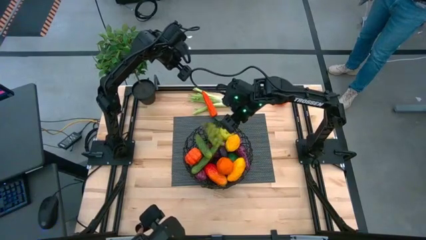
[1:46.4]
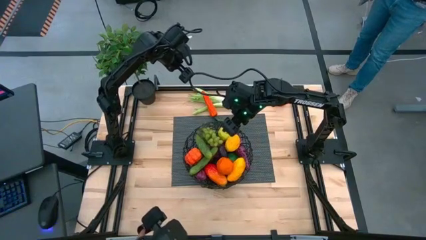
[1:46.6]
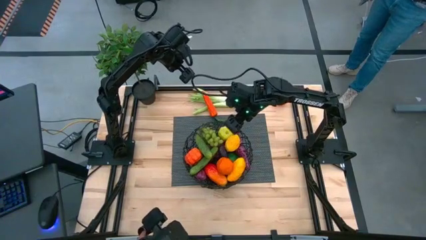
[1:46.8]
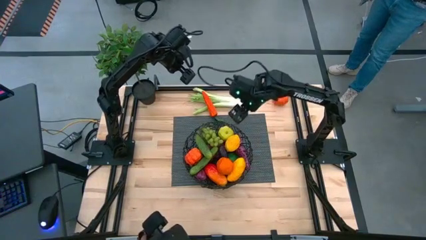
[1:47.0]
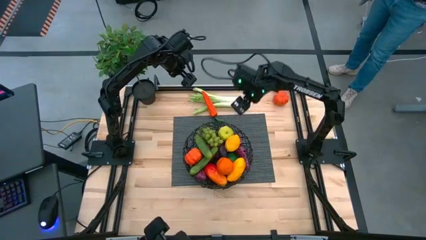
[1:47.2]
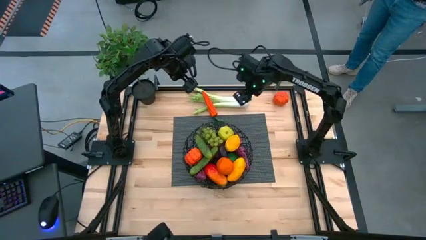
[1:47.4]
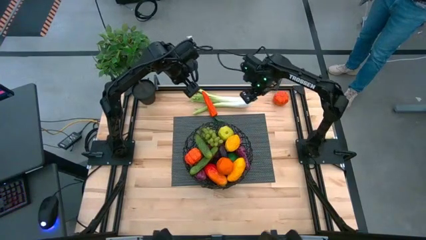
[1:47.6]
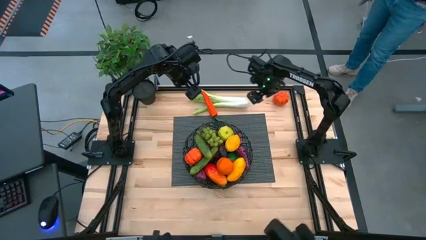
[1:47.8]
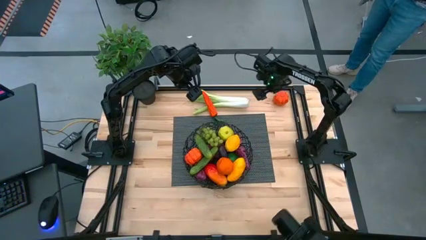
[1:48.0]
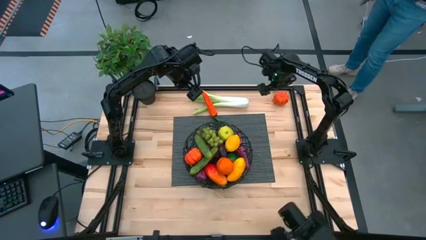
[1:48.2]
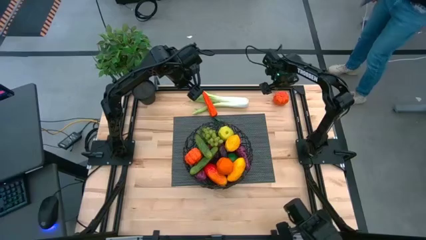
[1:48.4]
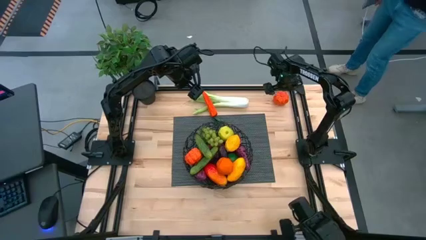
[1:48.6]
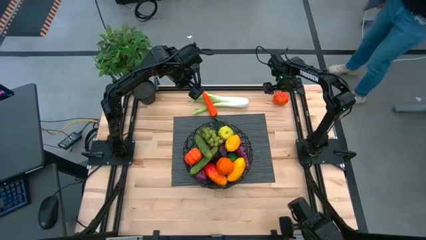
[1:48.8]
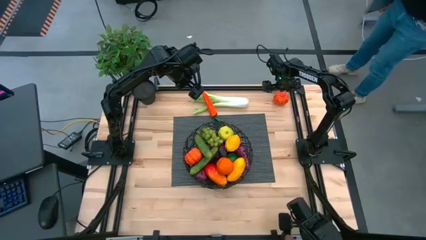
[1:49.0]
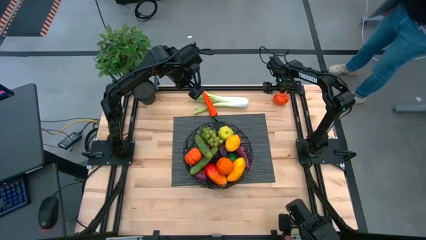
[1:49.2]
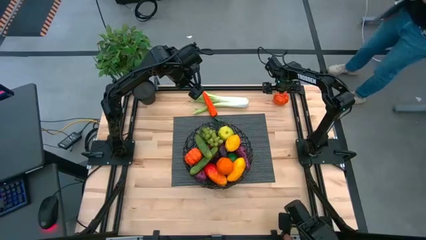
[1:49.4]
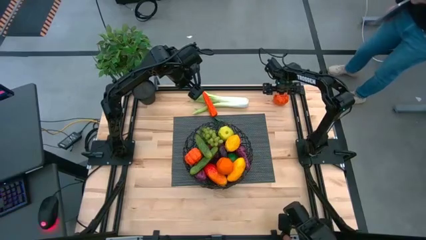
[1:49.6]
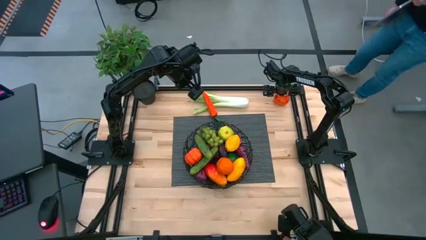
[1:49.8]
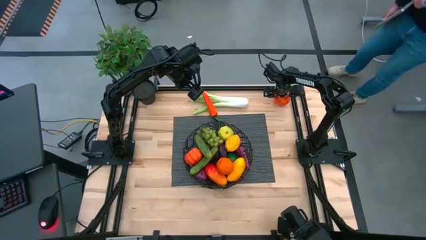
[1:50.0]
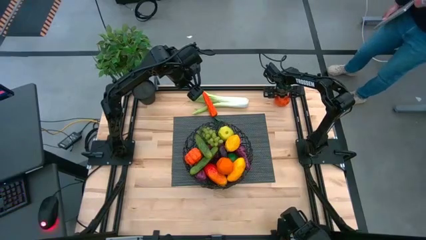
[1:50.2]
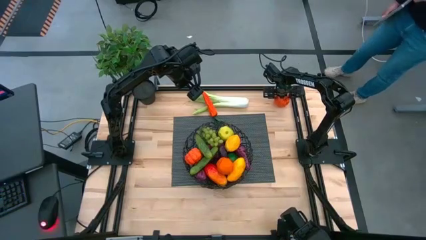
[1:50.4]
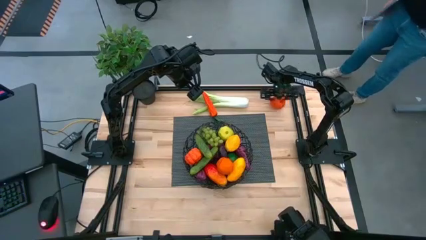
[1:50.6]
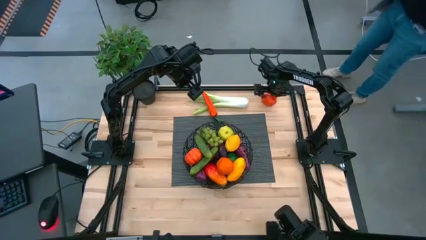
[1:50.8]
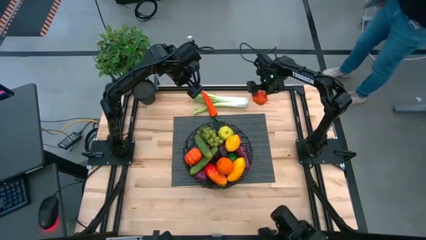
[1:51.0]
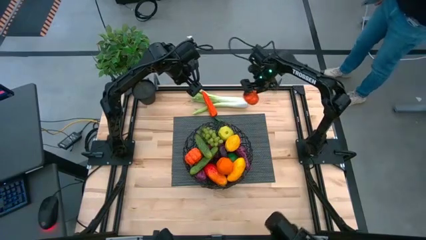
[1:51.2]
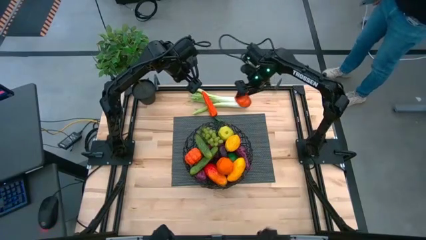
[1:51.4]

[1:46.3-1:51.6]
Task: Build produce basket
Put the orange pumpkin into the black wire basket

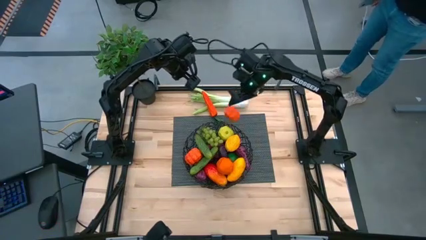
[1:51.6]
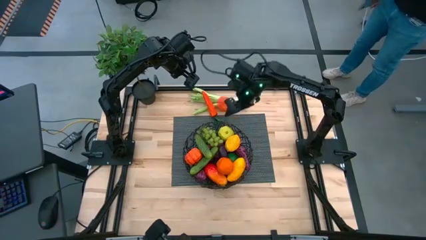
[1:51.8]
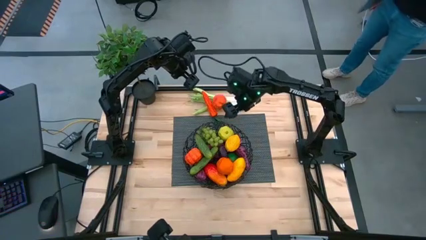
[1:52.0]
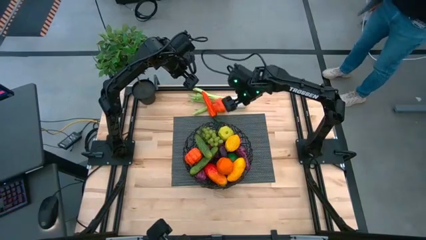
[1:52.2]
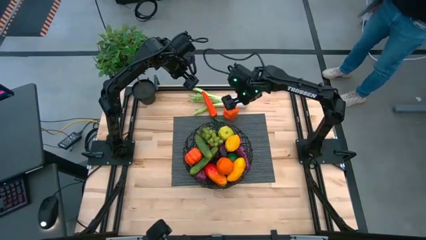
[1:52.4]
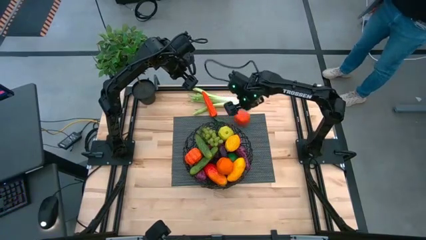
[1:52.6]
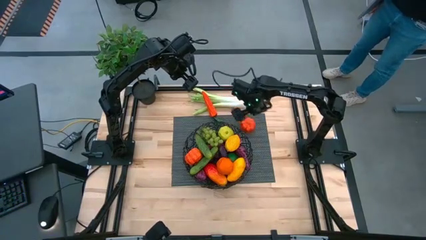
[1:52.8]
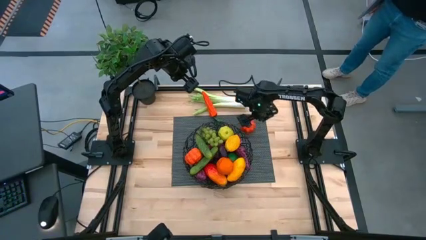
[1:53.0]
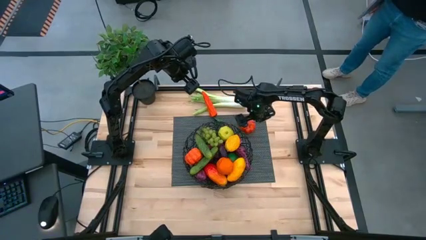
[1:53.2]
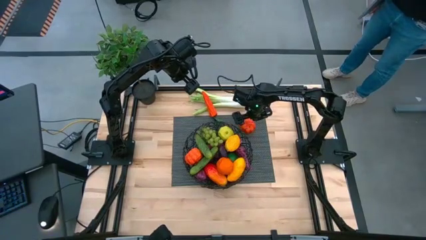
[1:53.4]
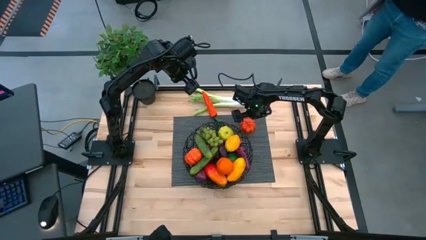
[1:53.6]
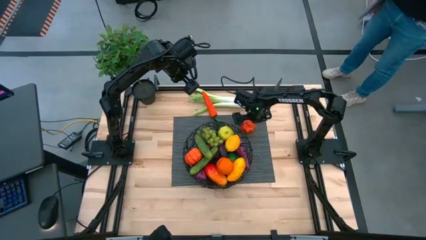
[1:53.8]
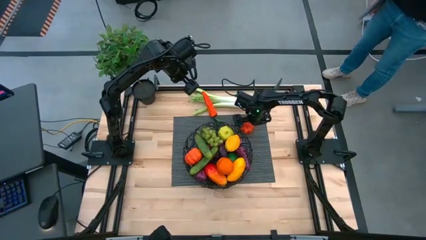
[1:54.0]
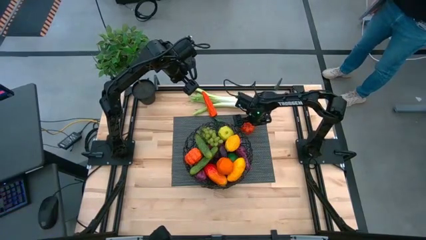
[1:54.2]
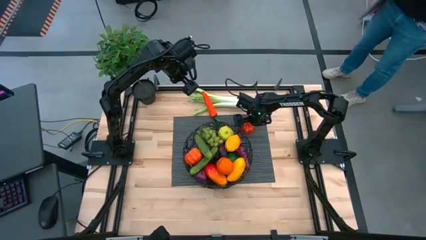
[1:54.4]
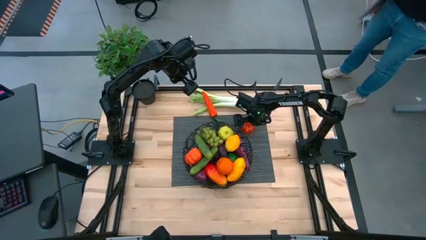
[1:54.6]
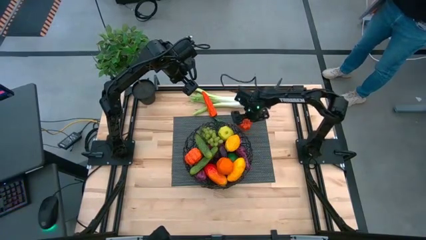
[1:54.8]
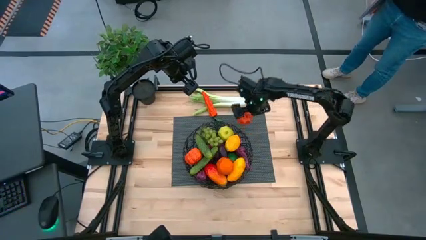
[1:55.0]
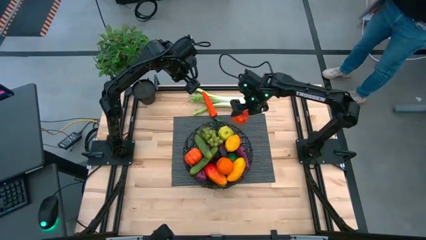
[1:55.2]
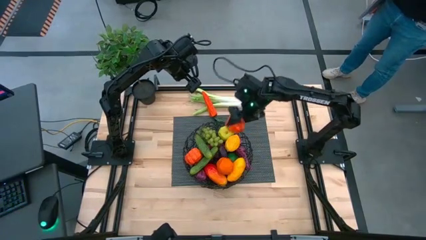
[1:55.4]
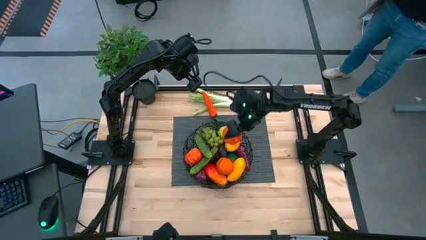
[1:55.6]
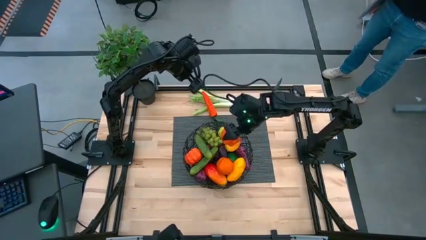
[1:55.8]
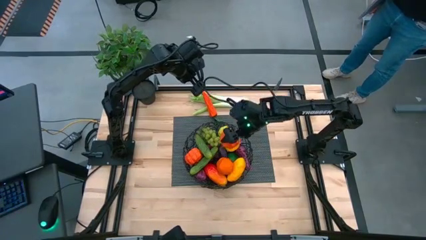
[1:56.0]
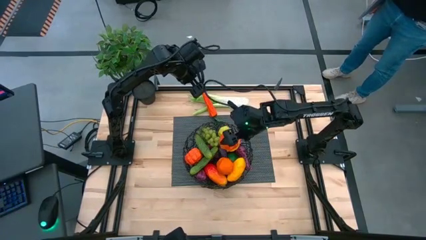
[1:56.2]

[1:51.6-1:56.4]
Put the orange pumpkin into the black wire basket

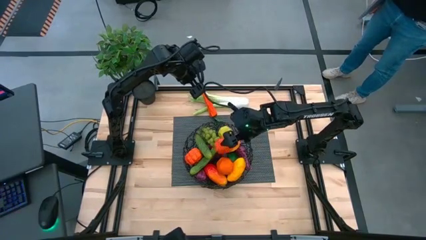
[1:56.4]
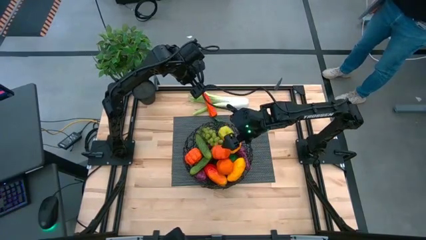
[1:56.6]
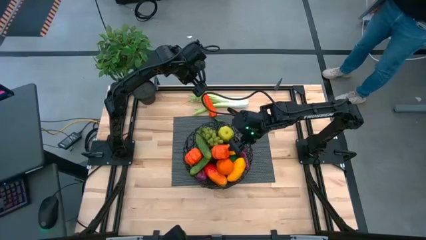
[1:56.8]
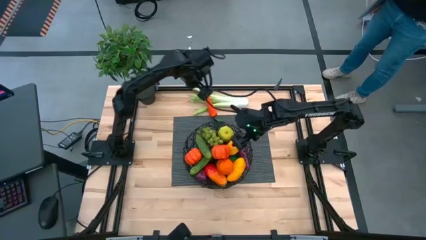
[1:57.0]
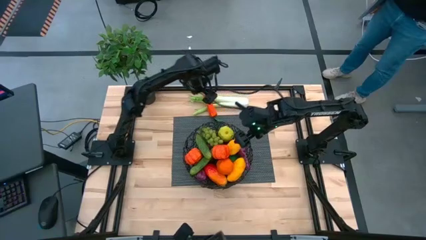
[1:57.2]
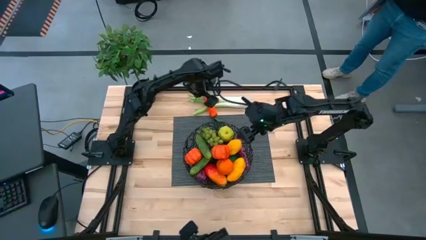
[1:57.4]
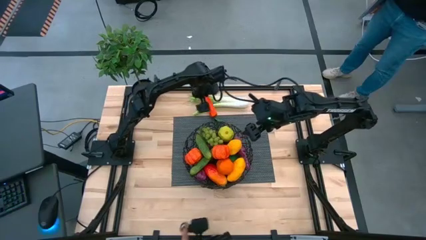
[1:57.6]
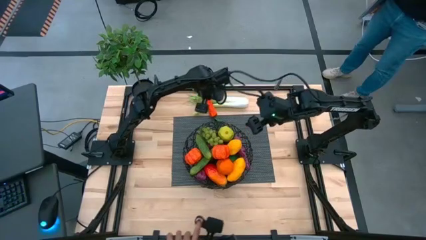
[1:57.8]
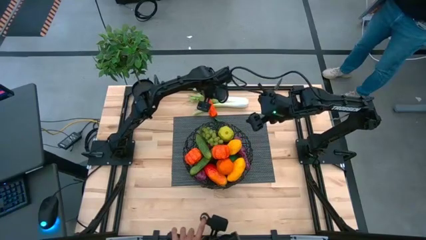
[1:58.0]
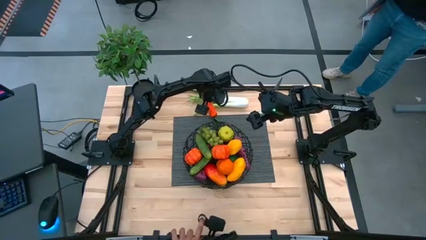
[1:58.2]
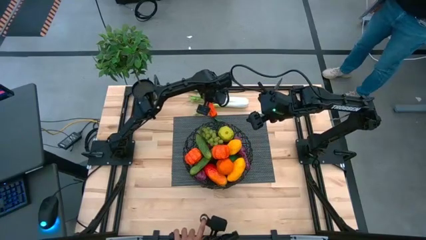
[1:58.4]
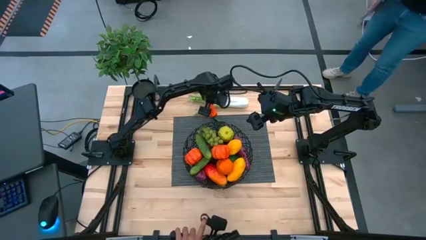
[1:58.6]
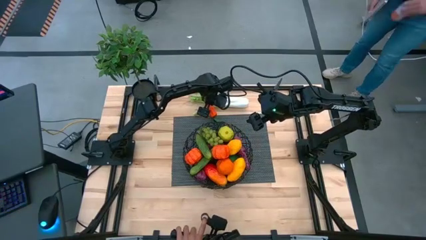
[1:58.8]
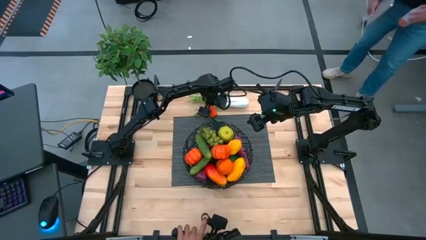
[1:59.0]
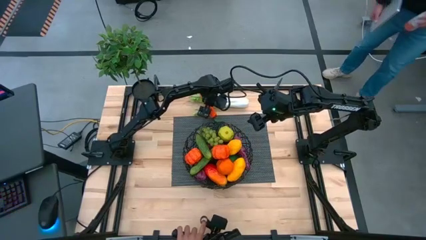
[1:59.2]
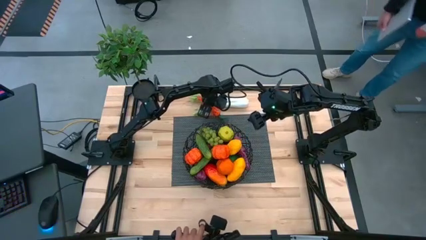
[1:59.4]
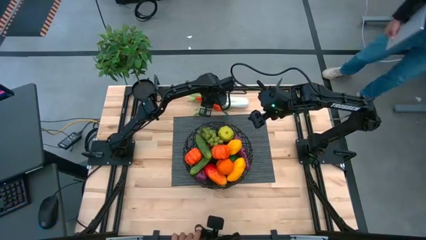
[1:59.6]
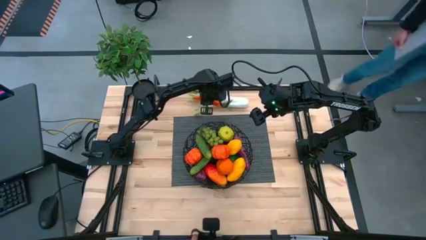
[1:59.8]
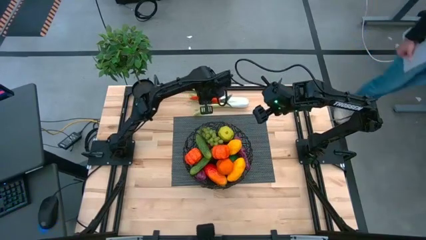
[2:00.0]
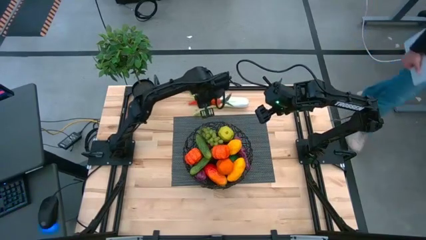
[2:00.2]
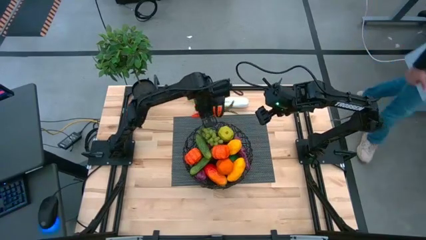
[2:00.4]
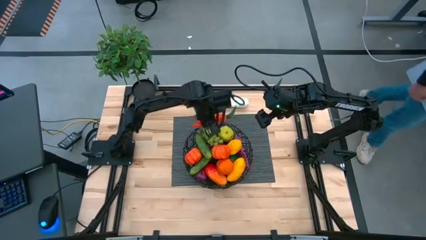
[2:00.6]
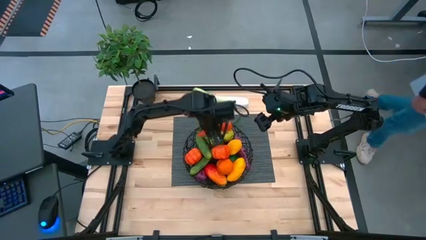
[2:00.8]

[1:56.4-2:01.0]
Put the orange carrot into the black wire basket
